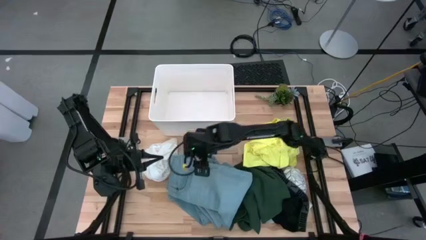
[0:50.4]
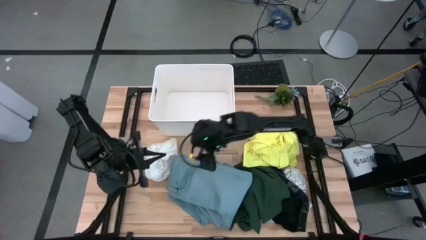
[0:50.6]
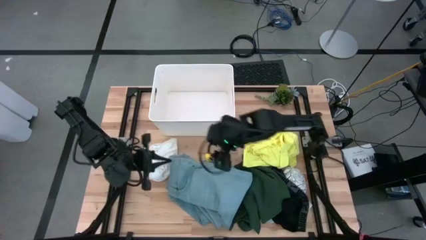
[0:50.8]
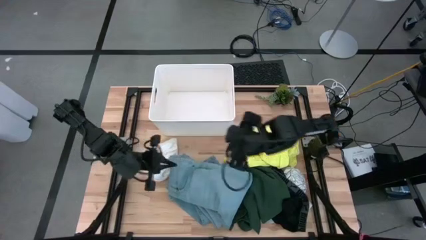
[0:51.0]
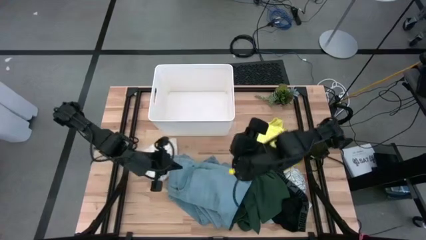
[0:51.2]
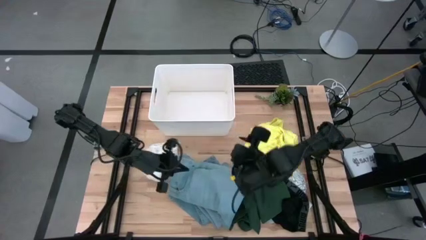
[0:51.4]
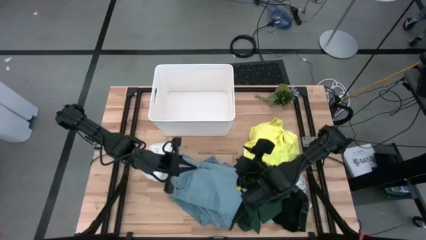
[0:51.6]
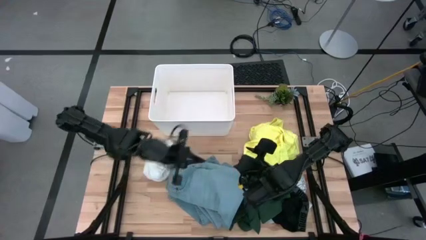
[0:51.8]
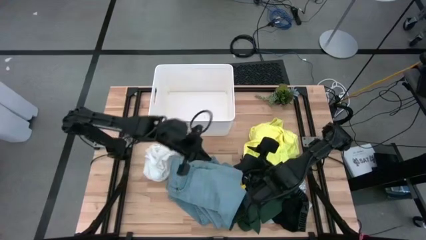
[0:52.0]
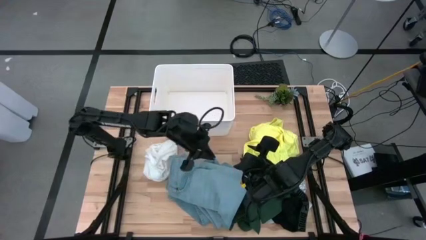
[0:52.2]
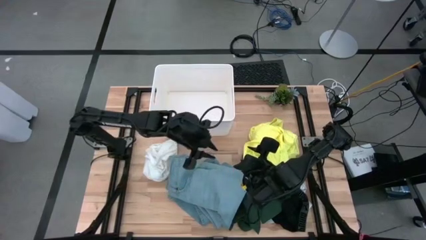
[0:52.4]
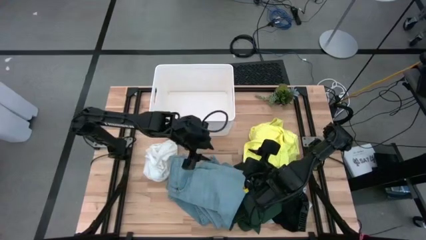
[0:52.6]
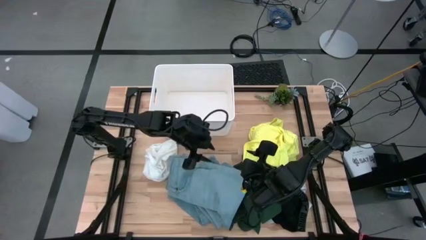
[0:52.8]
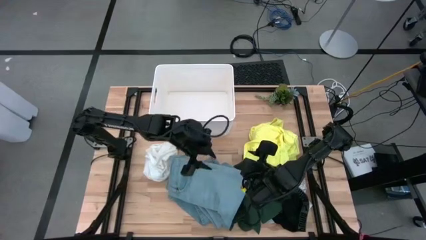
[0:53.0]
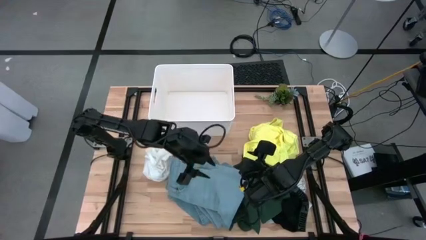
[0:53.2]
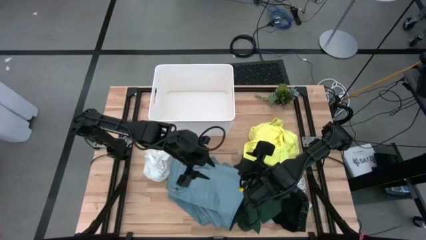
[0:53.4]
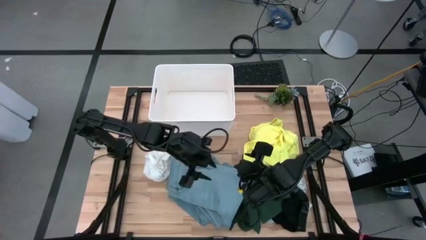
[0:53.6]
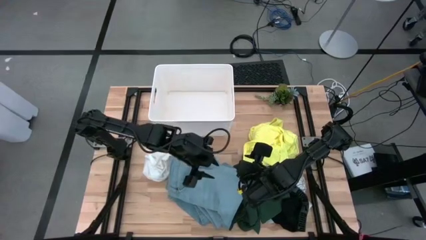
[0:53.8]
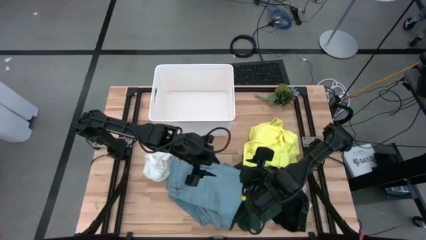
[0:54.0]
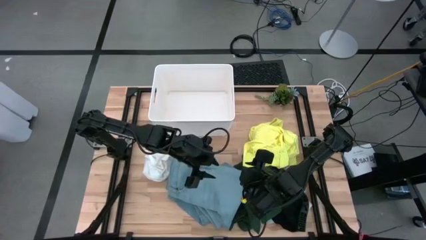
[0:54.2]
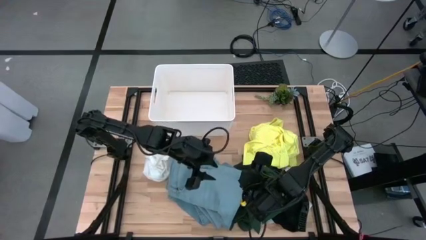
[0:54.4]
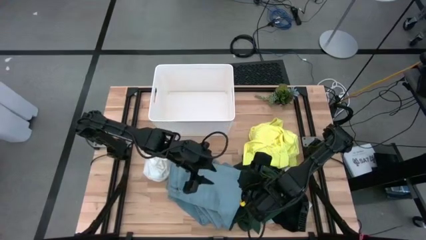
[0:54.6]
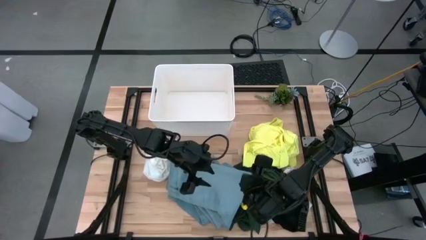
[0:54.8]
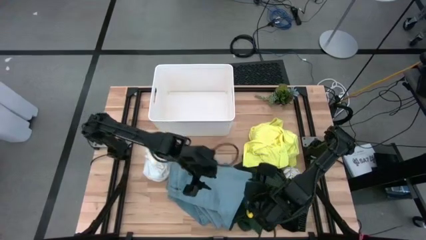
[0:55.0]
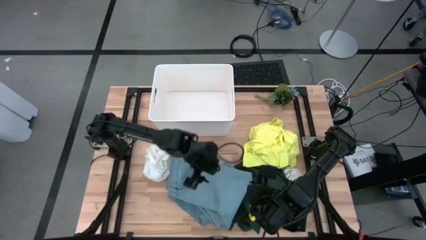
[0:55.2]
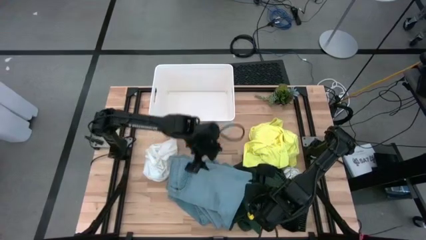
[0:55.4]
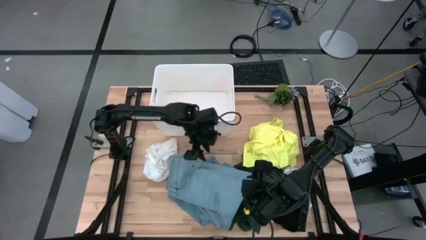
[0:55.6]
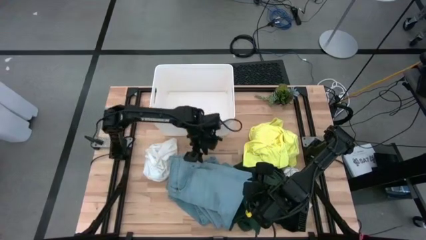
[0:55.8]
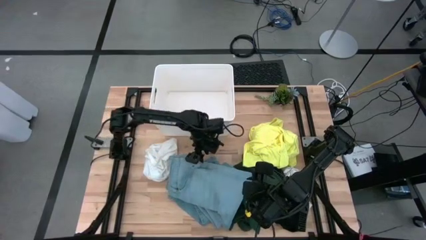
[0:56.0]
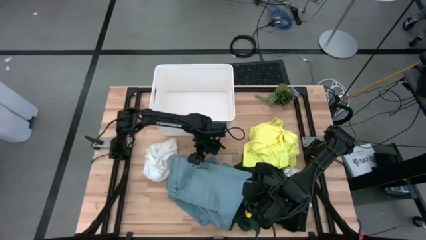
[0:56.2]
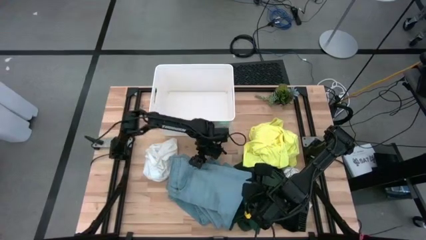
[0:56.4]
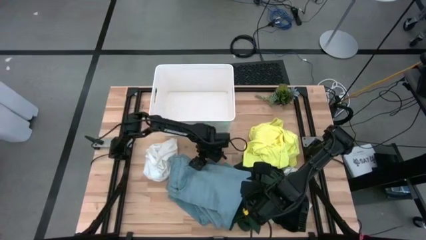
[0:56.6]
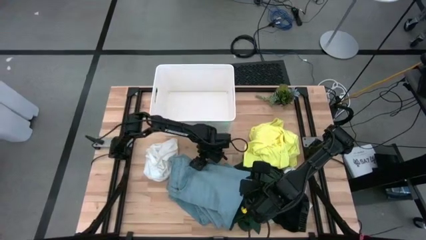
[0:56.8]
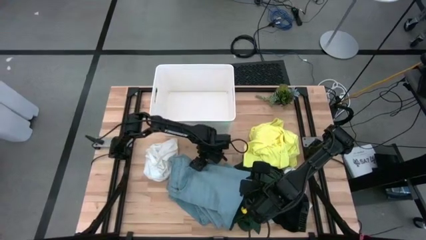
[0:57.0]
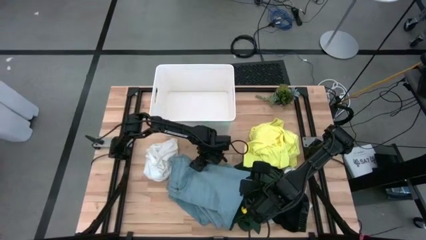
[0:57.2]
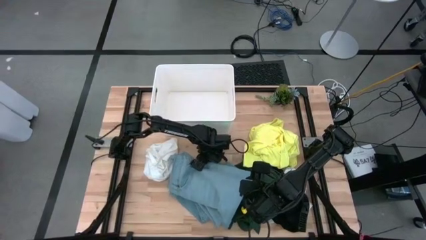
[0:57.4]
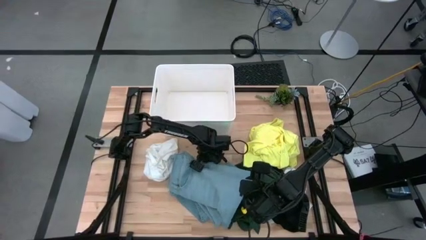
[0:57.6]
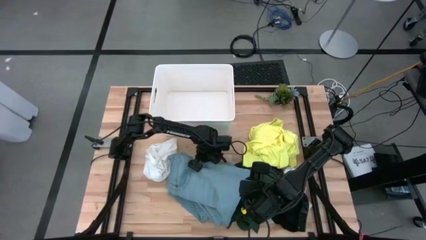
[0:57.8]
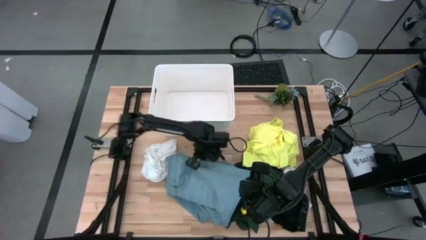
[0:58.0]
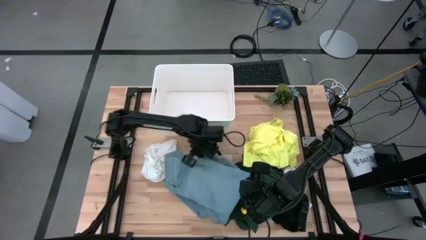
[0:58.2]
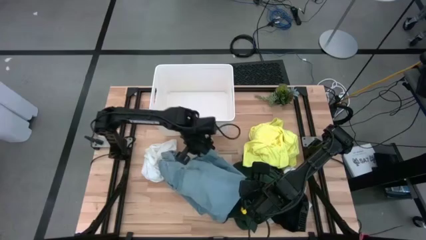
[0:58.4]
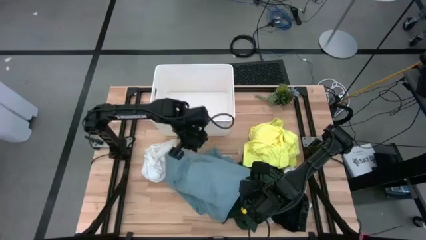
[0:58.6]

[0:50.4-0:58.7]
Task: Fold laundry
Put the folded blue pants into the white laundry bin

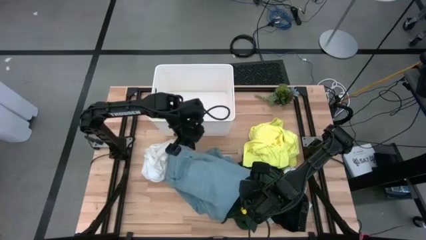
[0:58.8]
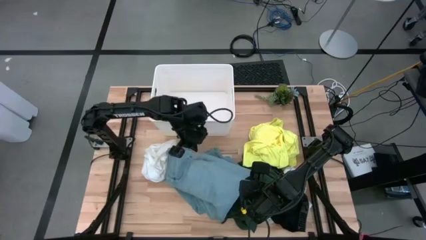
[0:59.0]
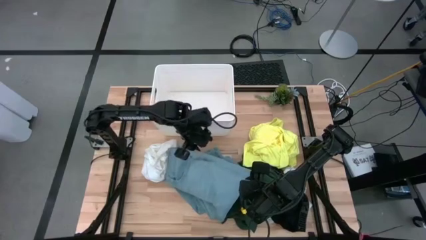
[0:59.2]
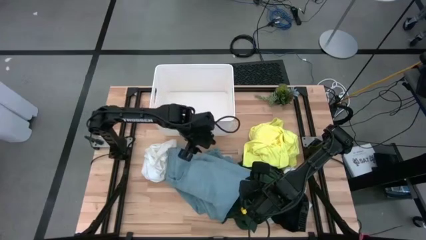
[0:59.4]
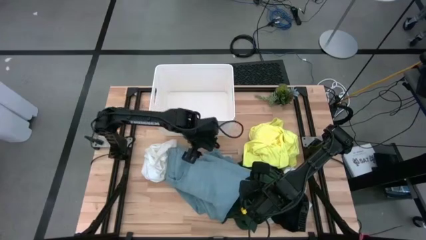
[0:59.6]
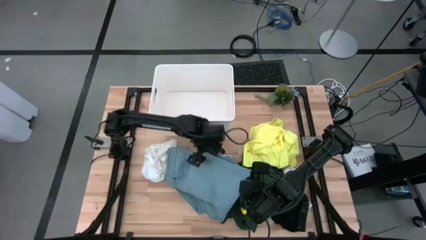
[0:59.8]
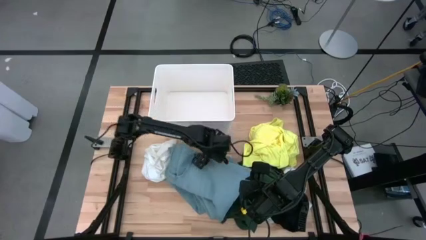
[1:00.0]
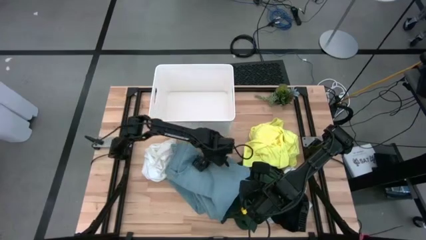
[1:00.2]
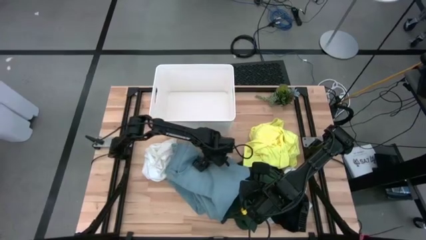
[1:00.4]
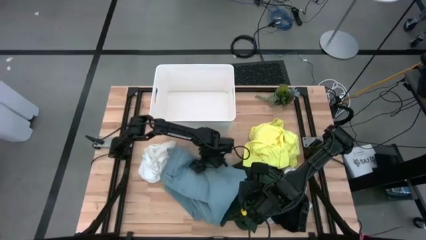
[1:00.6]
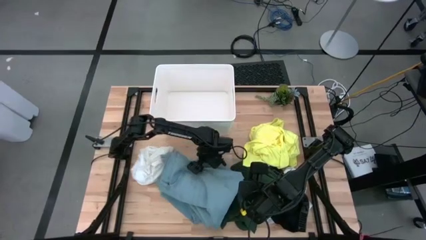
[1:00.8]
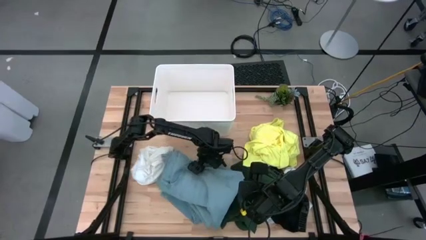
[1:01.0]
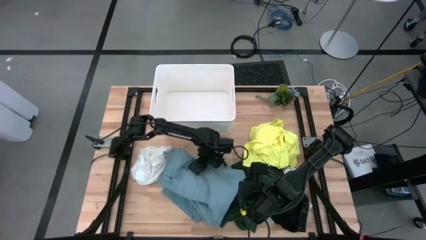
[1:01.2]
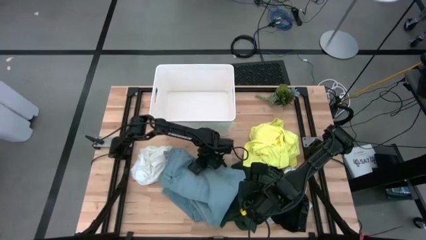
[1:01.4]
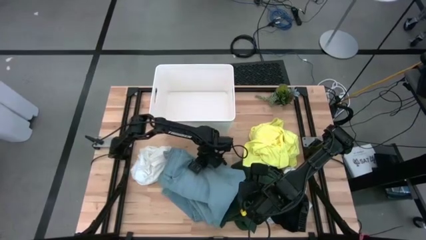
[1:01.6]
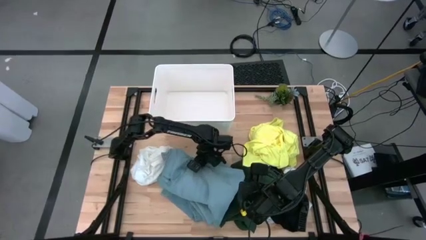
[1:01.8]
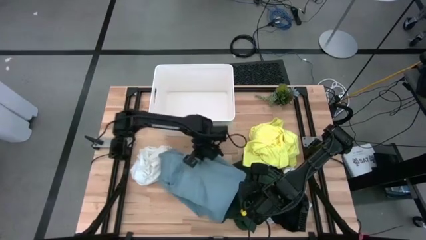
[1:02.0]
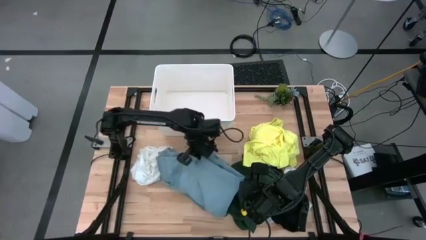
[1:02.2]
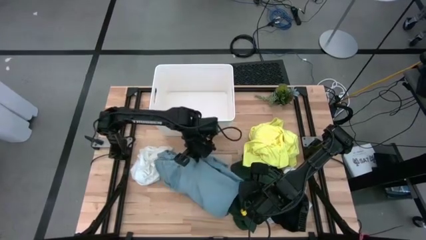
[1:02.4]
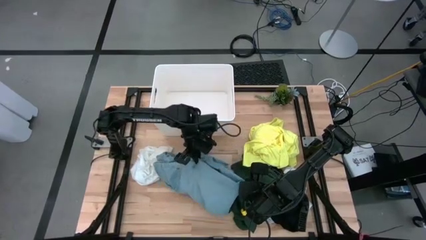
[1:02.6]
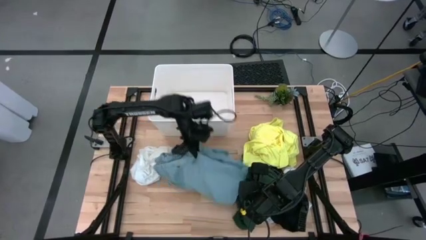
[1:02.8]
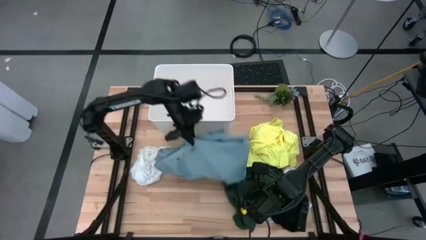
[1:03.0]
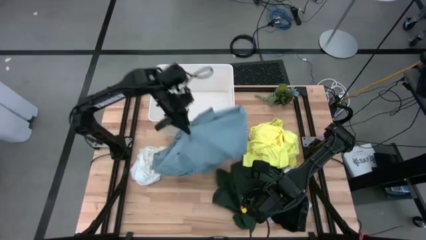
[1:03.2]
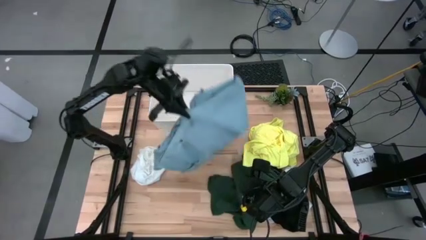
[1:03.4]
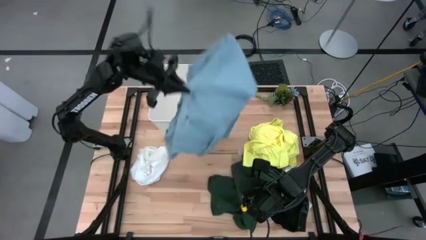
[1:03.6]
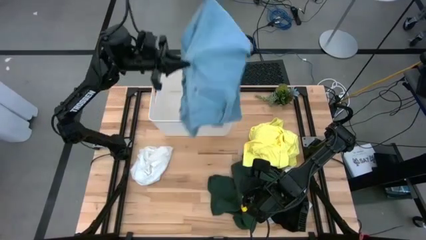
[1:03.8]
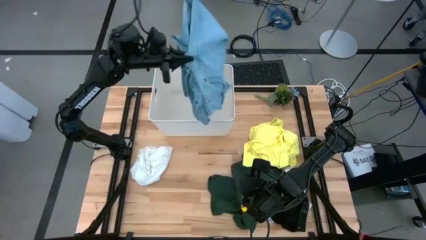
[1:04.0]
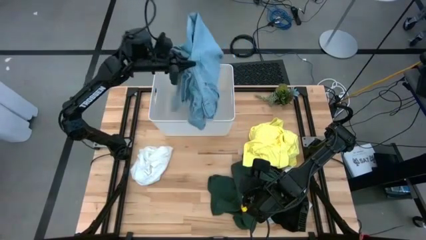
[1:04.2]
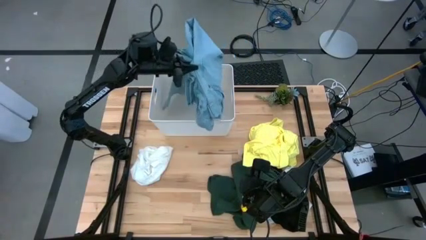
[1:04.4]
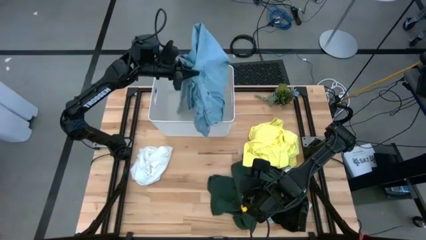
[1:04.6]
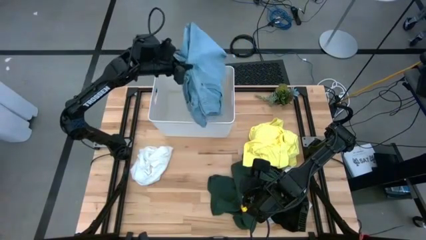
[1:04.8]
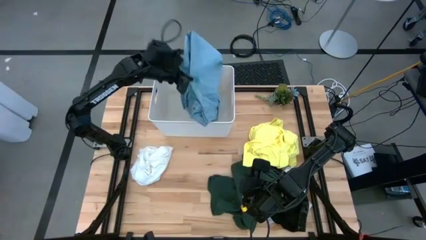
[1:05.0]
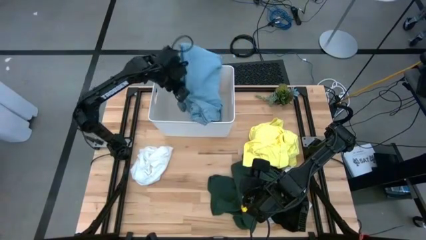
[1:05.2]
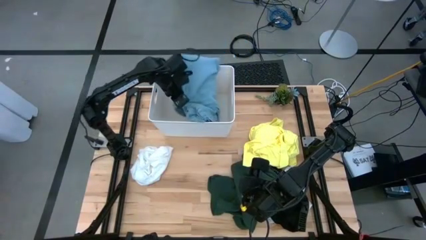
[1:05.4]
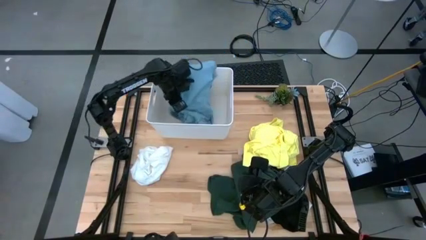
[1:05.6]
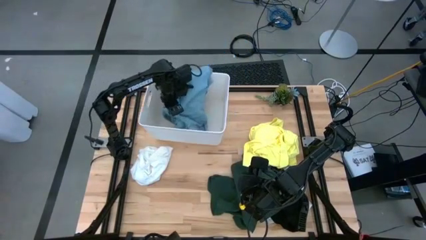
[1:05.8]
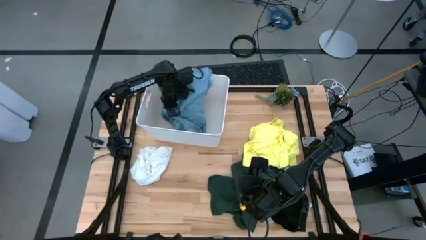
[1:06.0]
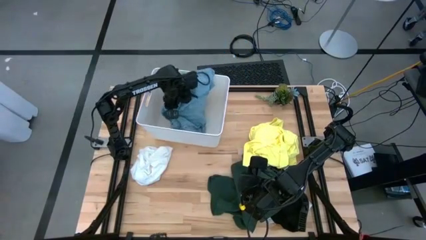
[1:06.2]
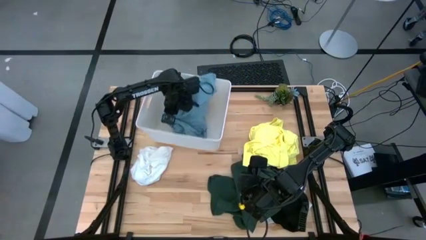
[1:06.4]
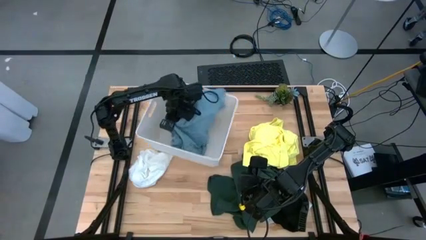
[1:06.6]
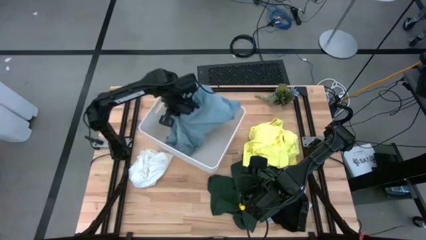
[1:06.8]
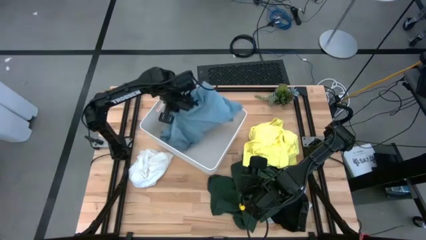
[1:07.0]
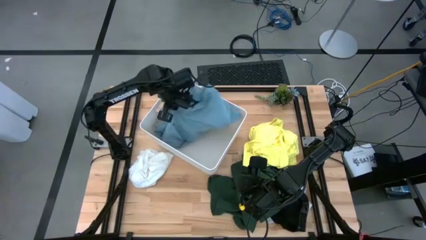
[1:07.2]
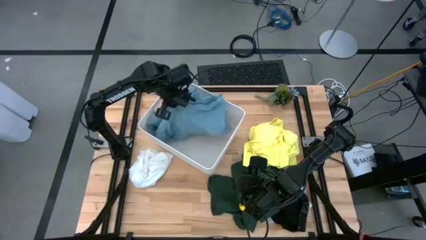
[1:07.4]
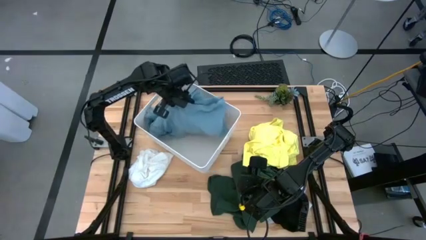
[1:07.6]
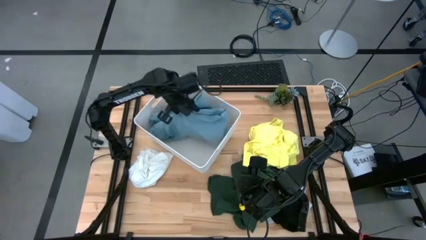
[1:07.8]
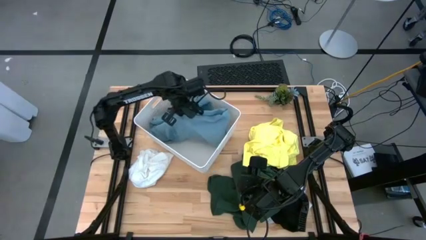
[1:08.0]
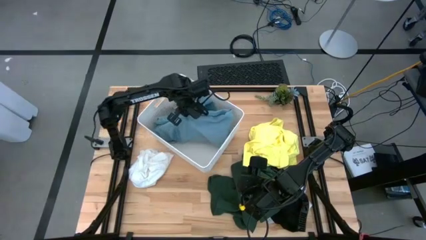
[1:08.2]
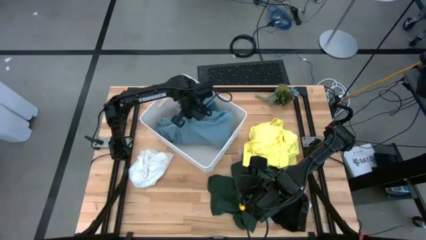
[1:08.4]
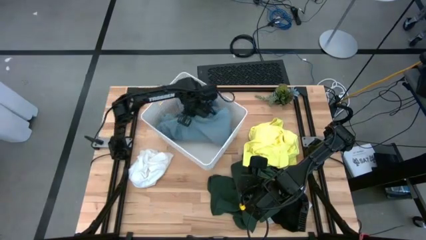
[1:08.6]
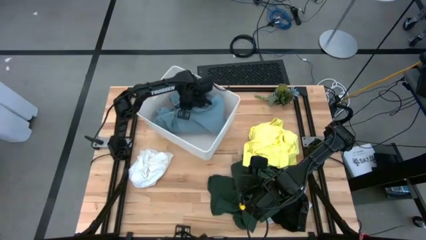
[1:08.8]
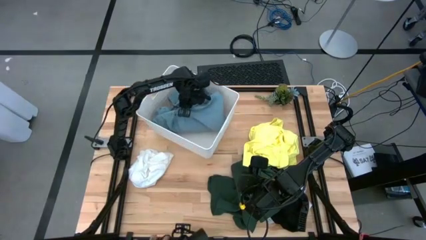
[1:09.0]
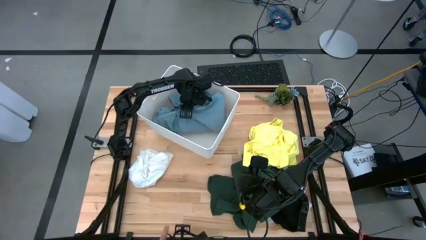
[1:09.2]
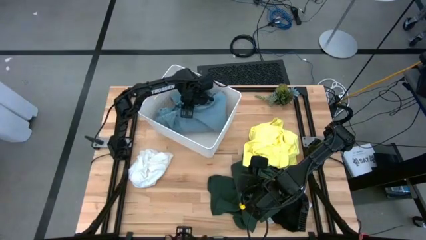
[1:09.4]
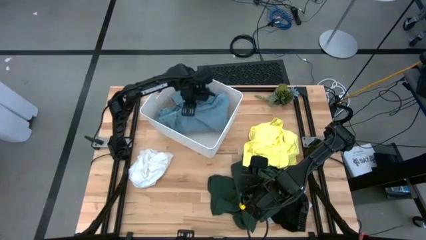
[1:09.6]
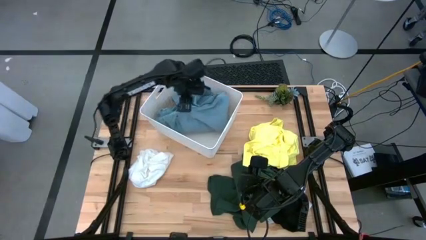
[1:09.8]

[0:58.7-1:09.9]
Put the folded blue pants into the white laundry bin
